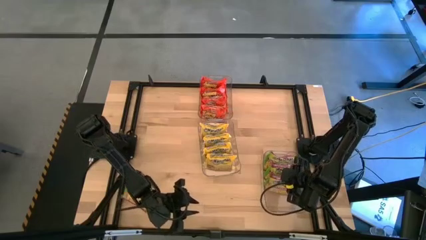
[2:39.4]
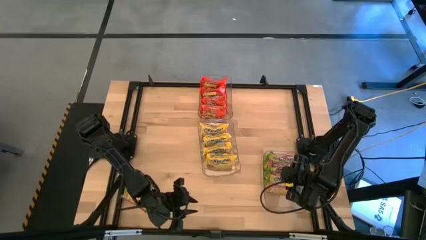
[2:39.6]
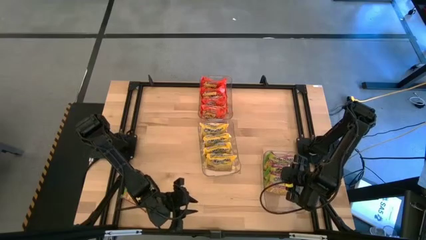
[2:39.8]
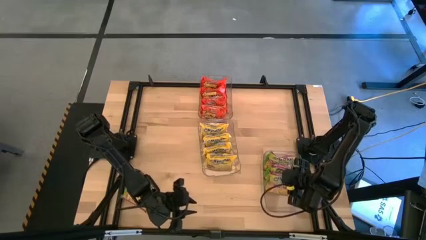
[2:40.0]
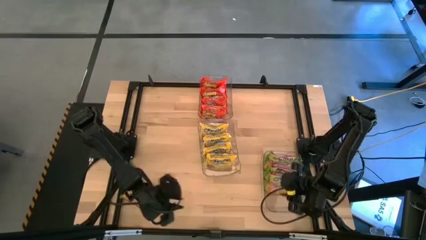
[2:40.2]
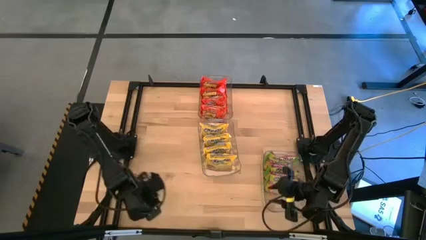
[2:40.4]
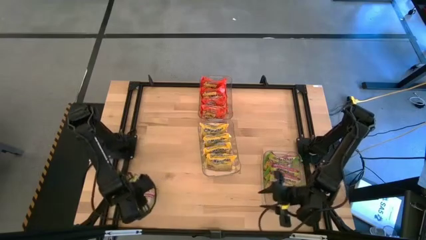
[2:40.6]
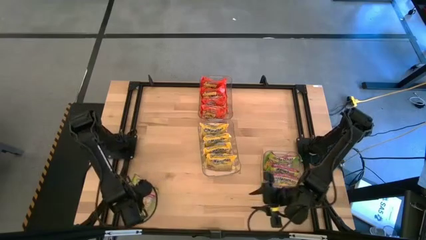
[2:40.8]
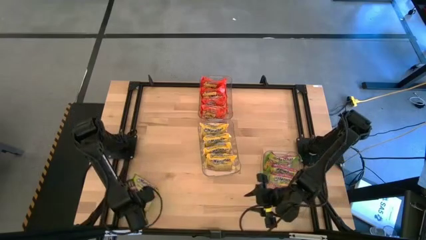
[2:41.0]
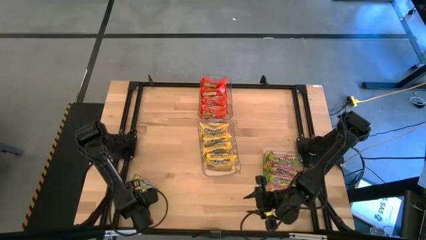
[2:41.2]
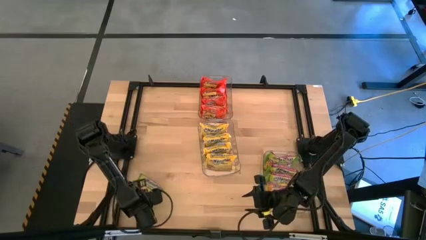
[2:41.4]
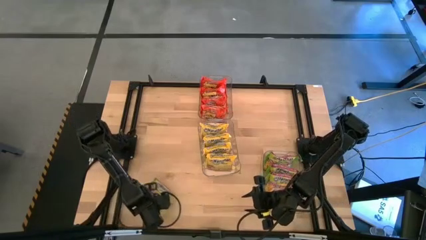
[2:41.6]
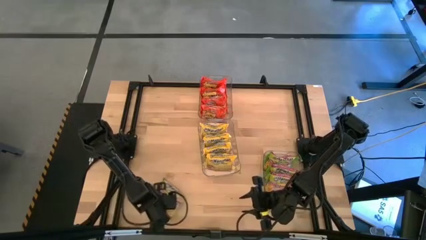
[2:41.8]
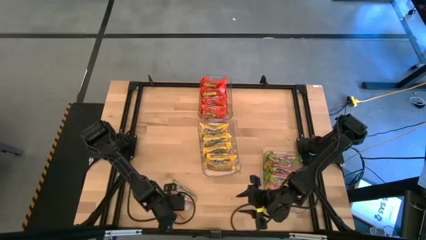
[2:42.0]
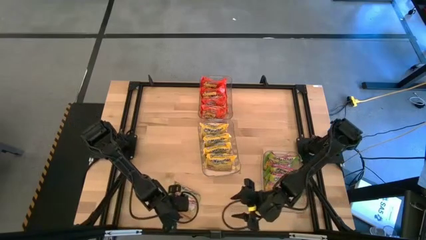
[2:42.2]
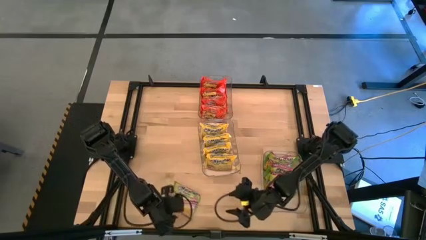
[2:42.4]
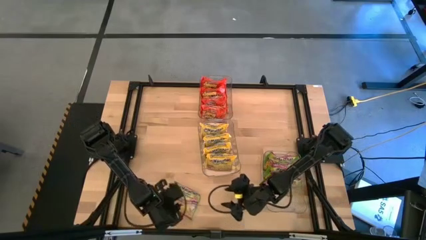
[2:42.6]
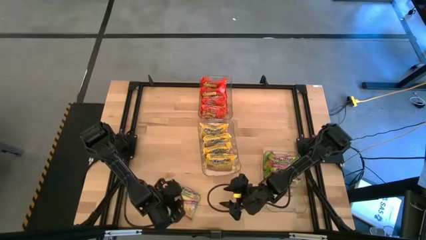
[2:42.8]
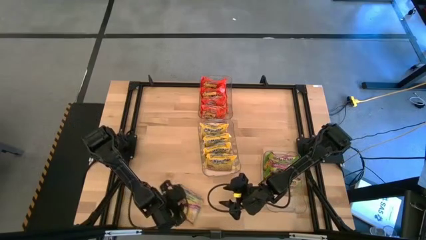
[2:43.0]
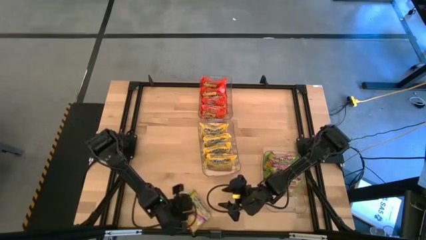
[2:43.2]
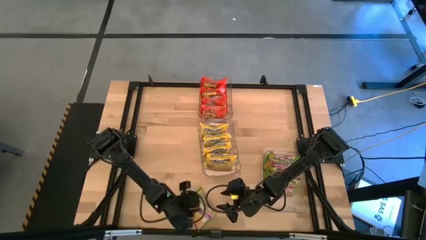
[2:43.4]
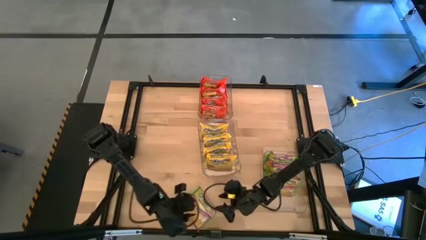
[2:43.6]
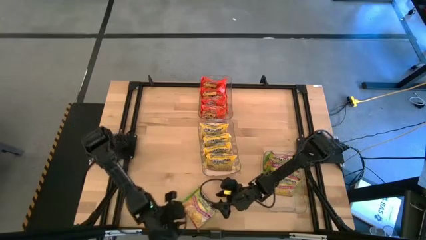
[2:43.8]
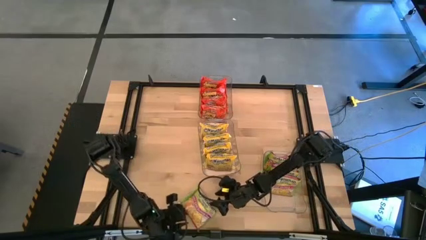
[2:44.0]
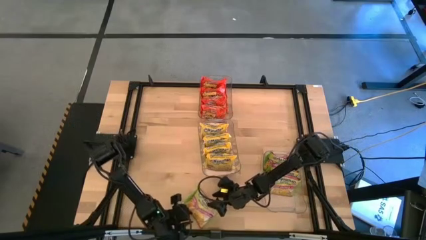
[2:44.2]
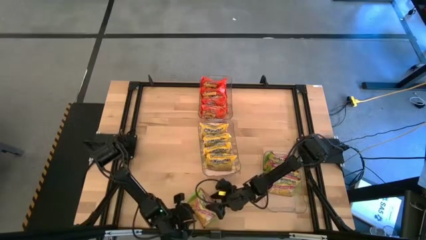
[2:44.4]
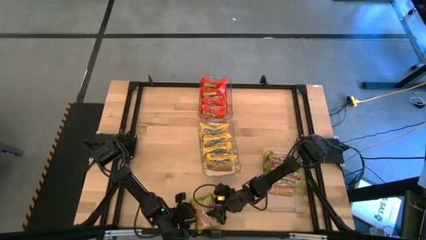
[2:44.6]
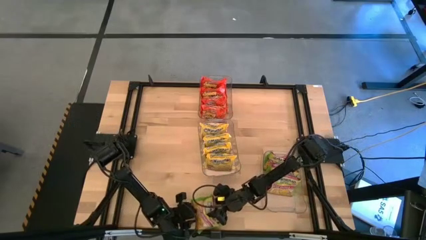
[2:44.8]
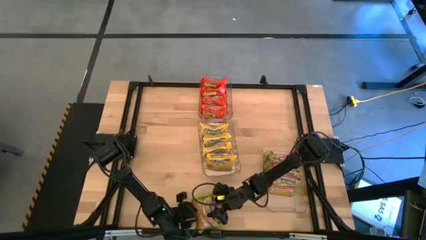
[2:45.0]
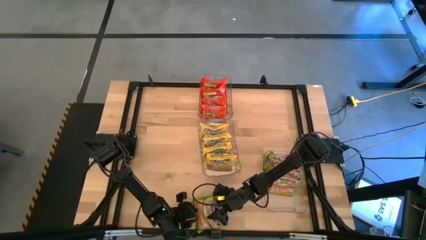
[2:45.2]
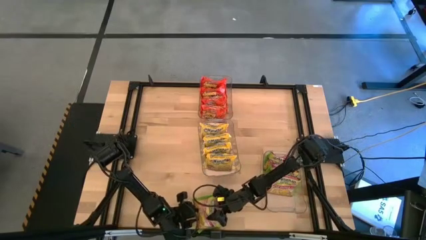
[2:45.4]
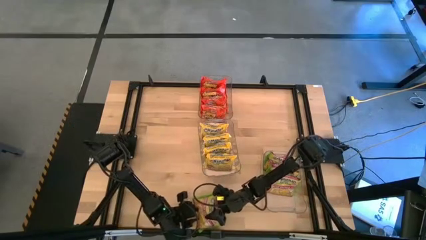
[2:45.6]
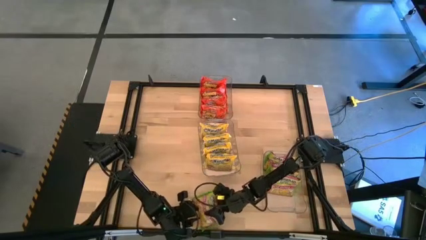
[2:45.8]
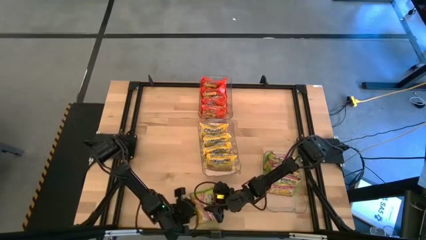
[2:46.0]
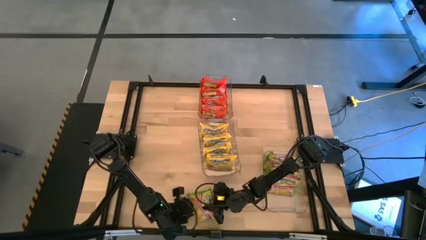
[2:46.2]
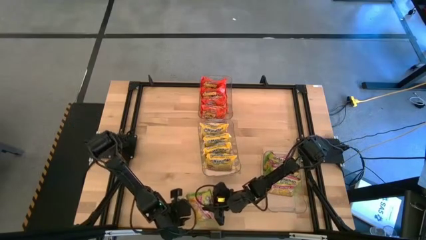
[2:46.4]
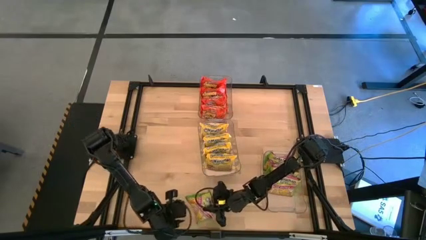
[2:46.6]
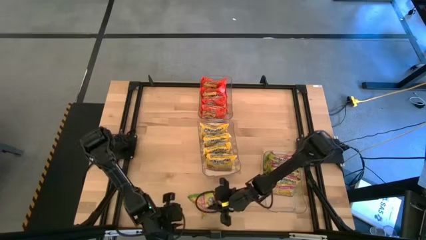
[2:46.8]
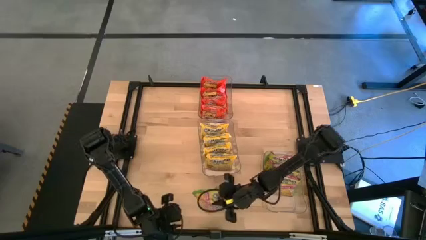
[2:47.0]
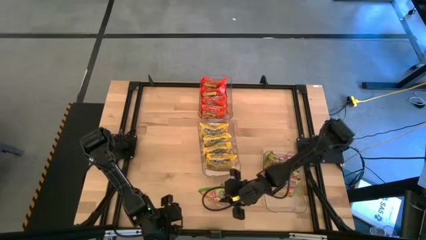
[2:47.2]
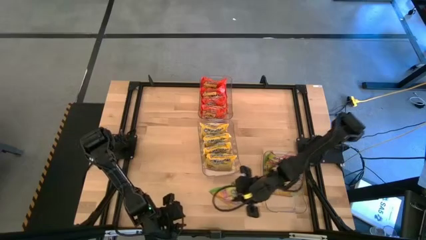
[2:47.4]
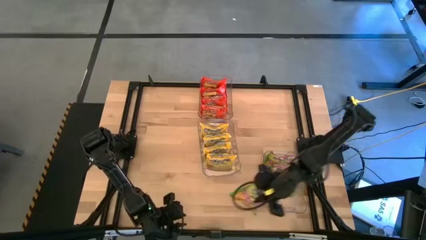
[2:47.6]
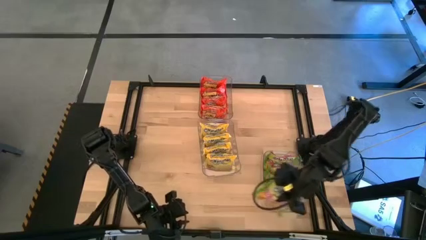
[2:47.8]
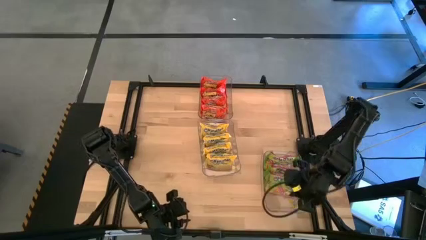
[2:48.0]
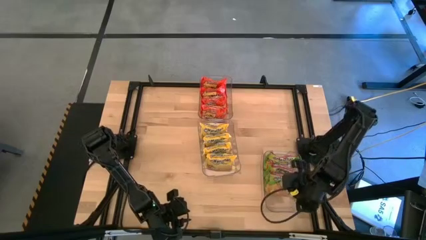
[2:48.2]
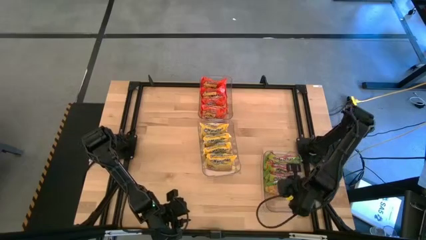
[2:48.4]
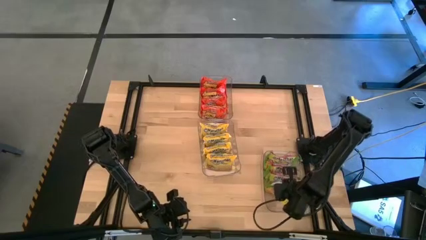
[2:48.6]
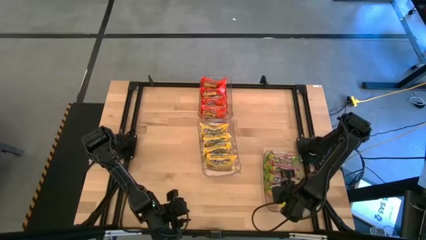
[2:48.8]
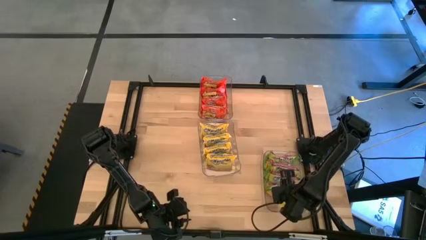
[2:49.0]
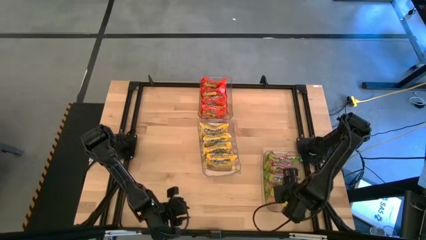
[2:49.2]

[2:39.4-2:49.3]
Task: Sort Maruchan noodles
Put the green noodle pack into the bottom transparent bin

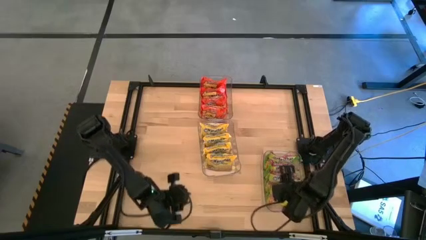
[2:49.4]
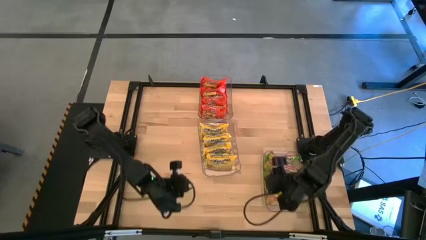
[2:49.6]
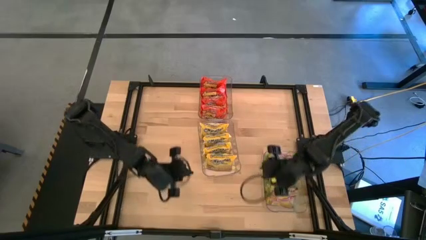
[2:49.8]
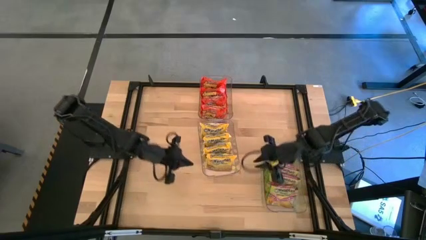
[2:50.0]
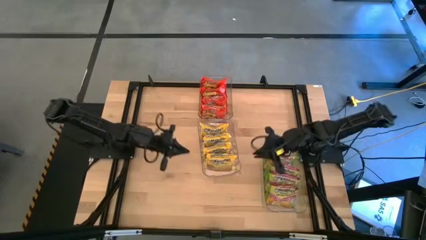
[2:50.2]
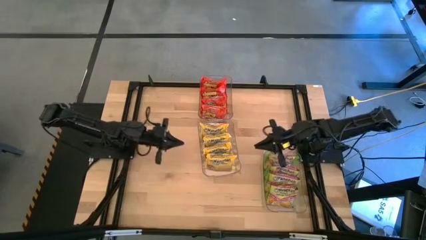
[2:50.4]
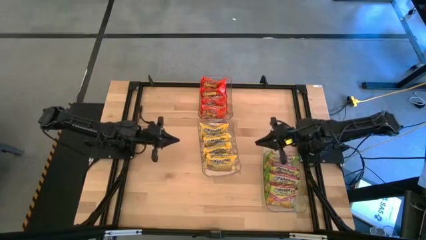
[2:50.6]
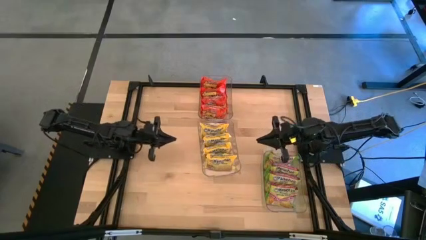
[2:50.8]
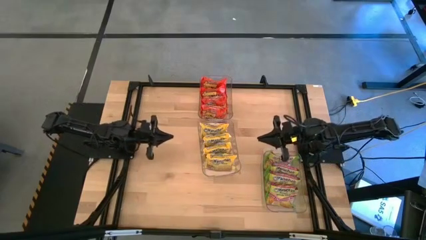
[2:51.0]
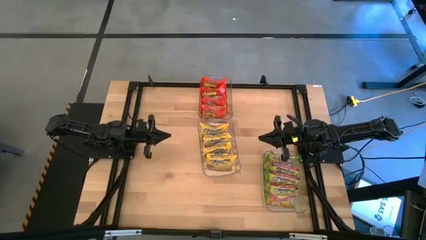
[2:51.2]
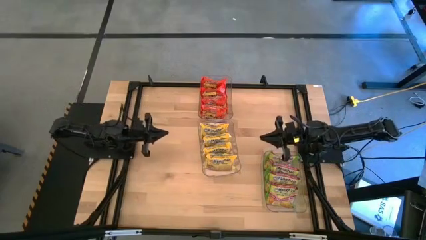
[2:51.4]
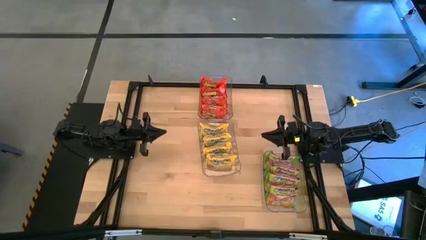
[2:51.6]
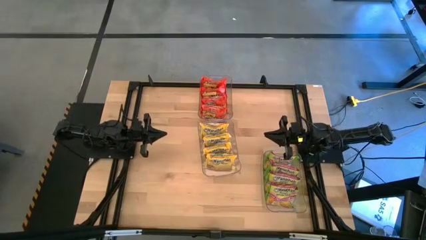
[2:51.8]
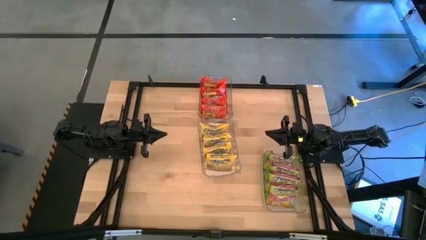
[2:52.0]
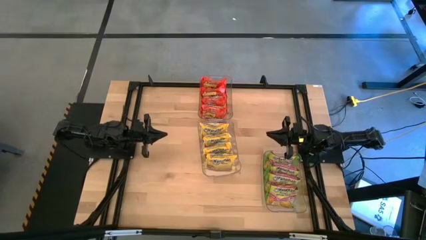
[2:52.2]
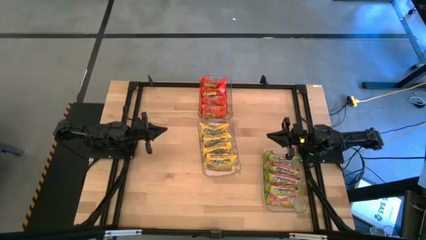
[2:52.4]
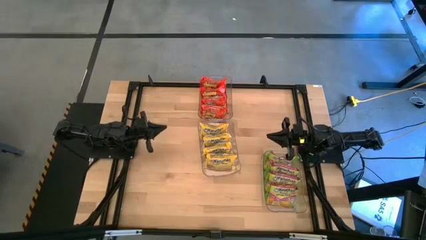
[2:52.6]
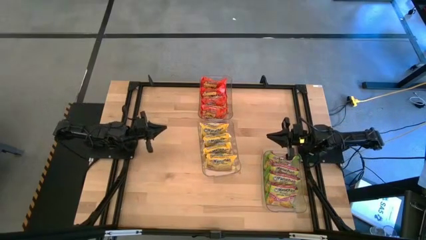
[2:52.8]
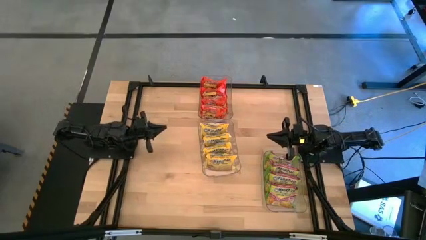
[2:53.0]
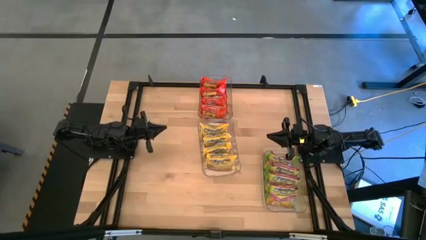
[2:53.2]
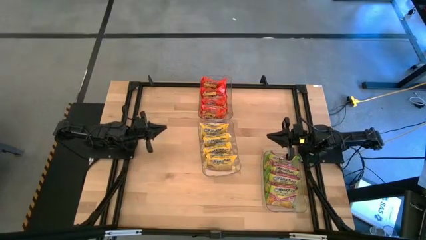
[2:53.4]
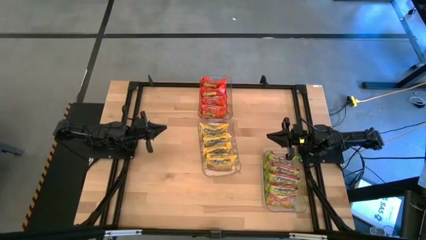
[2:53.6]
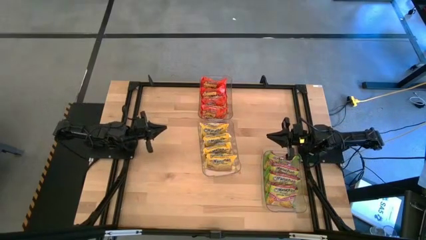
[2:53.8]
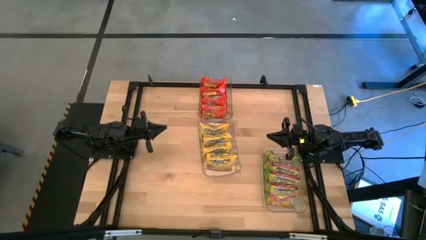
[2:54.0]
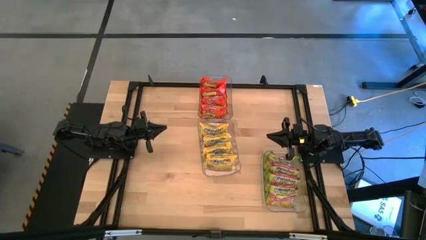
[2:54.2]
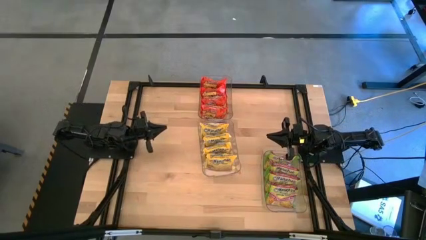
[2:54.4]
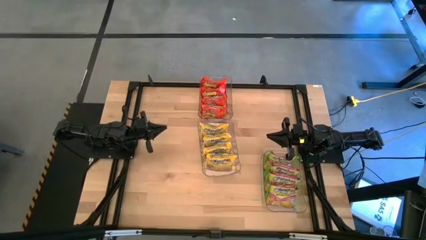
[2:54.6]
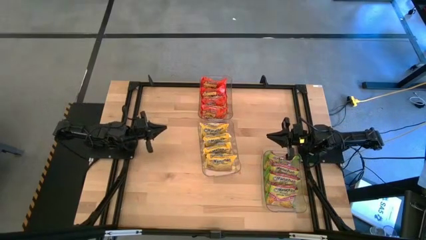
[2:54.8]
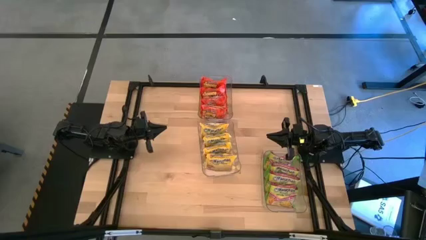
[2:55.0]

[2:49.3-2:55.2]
Return to Home Position
